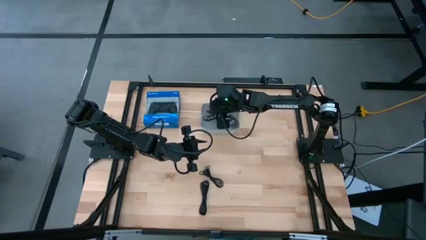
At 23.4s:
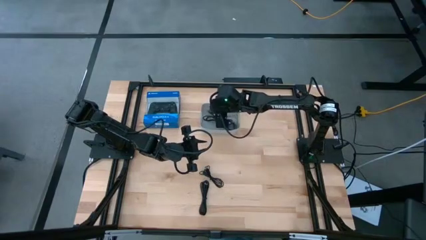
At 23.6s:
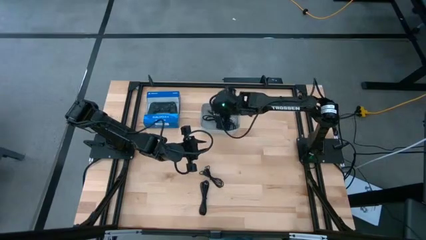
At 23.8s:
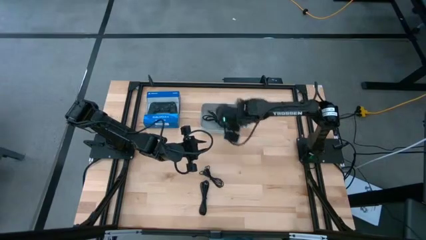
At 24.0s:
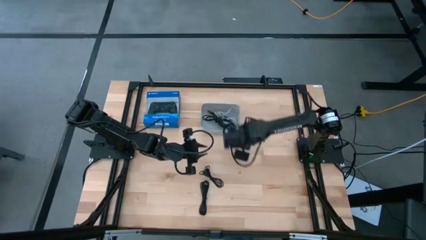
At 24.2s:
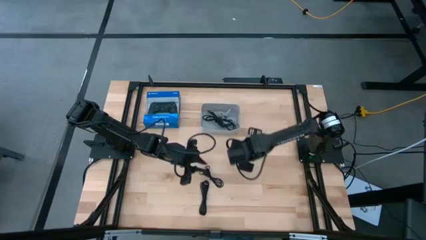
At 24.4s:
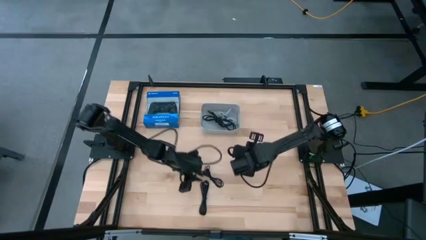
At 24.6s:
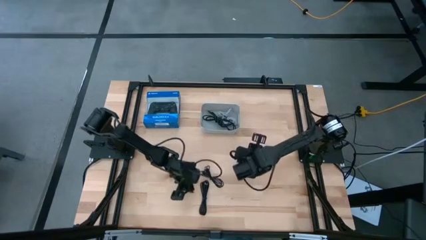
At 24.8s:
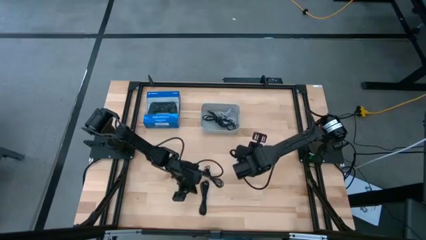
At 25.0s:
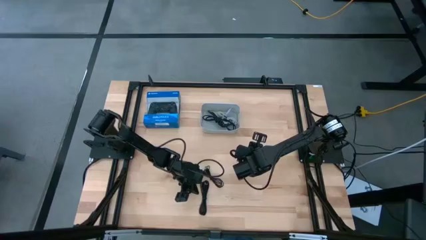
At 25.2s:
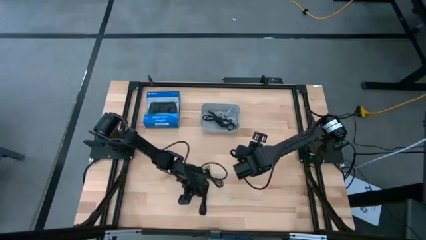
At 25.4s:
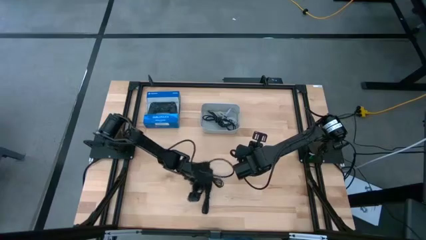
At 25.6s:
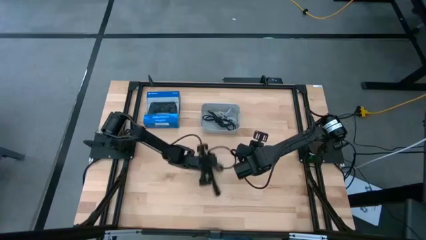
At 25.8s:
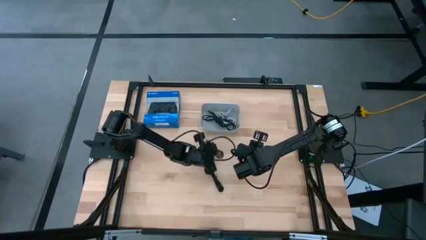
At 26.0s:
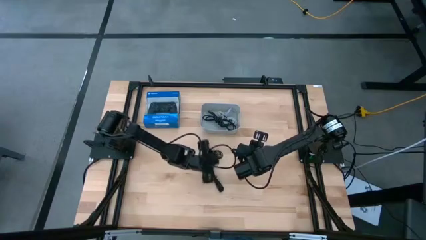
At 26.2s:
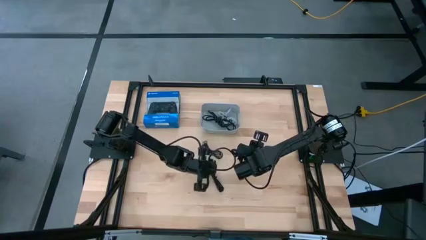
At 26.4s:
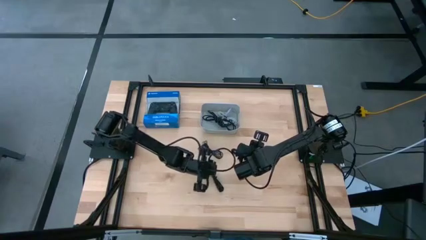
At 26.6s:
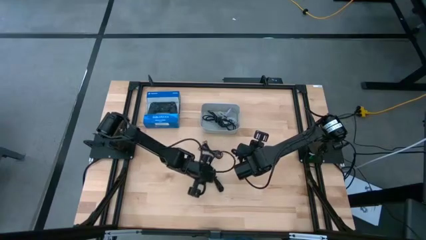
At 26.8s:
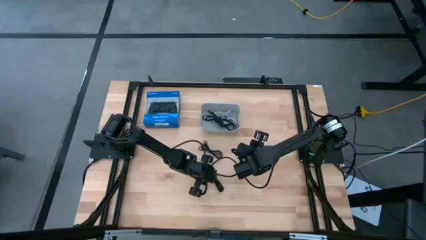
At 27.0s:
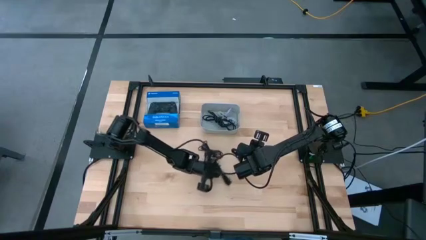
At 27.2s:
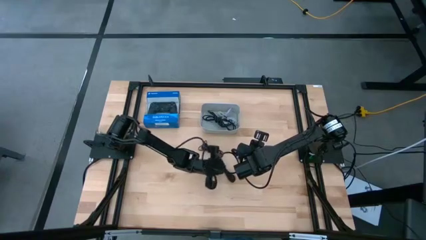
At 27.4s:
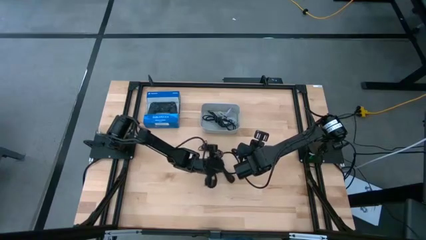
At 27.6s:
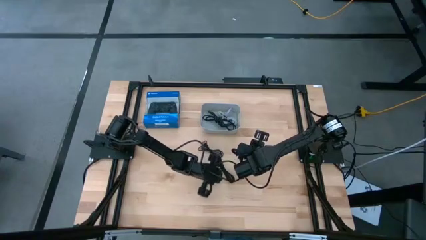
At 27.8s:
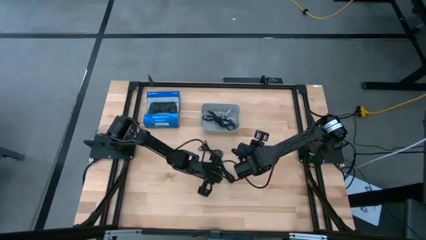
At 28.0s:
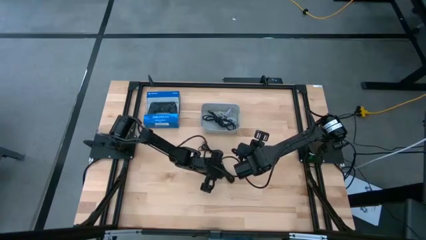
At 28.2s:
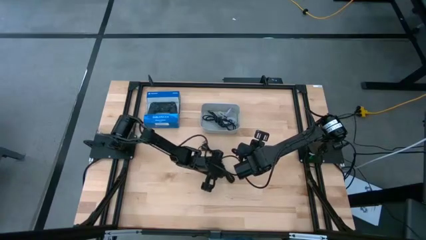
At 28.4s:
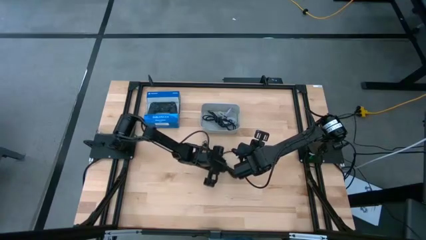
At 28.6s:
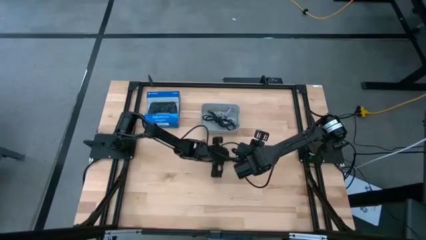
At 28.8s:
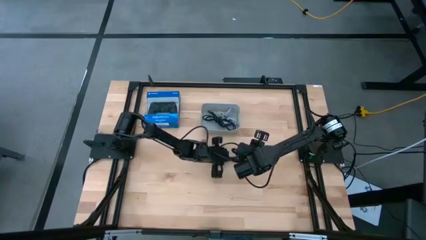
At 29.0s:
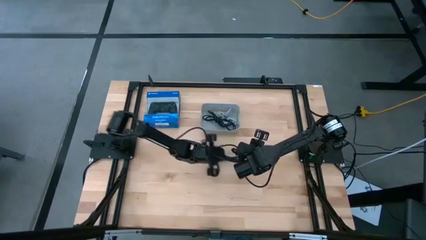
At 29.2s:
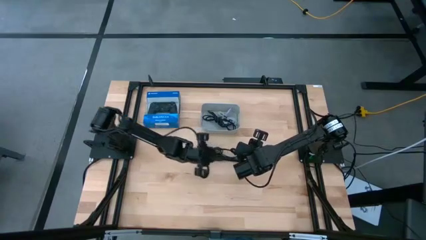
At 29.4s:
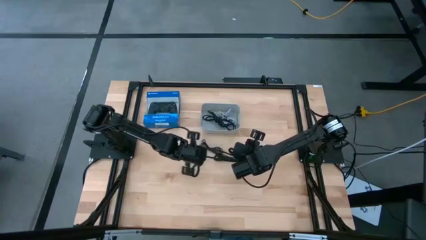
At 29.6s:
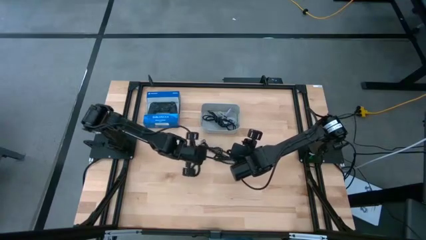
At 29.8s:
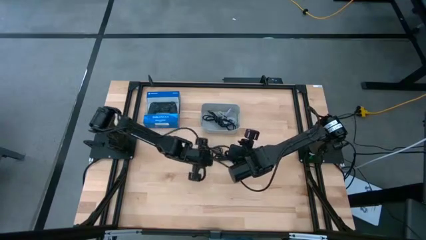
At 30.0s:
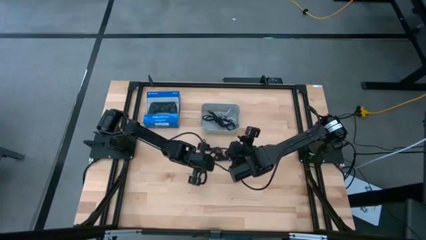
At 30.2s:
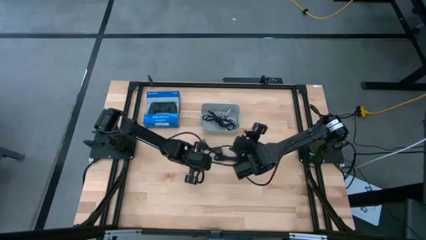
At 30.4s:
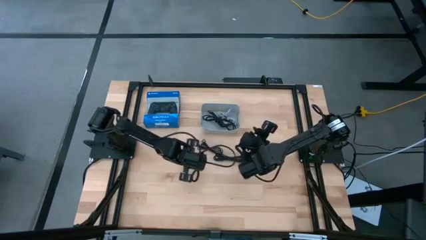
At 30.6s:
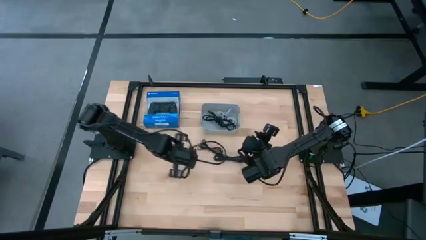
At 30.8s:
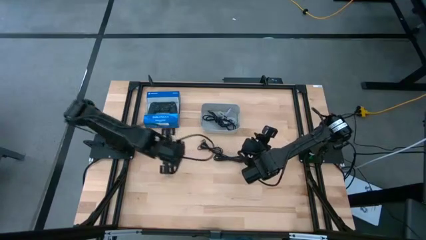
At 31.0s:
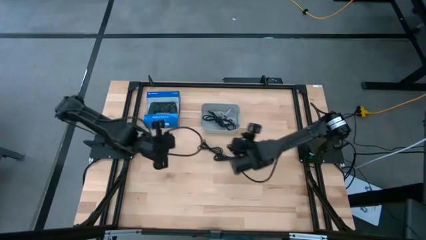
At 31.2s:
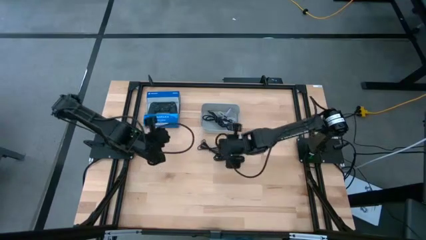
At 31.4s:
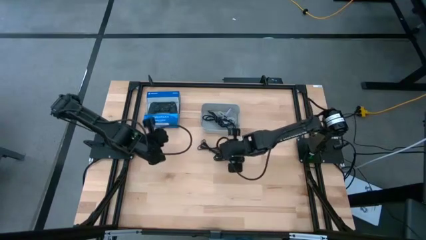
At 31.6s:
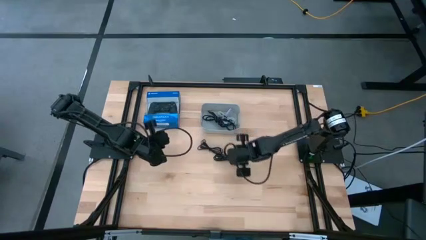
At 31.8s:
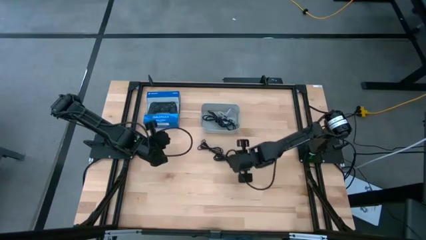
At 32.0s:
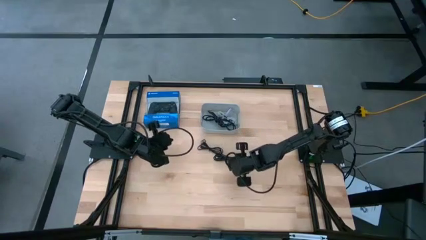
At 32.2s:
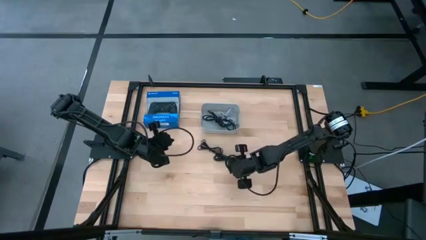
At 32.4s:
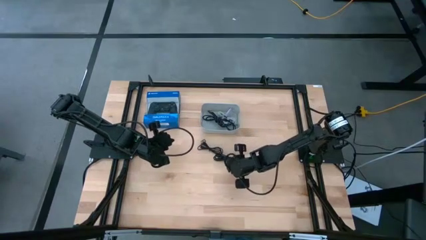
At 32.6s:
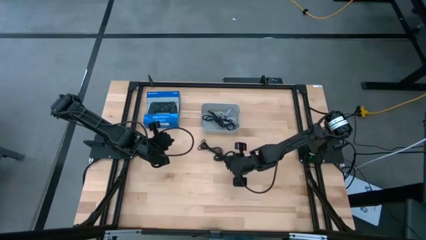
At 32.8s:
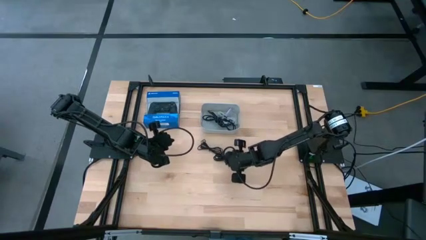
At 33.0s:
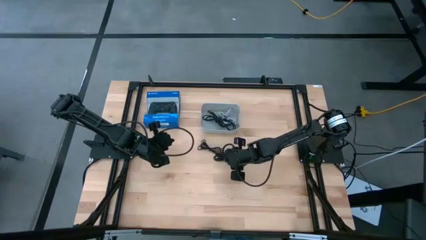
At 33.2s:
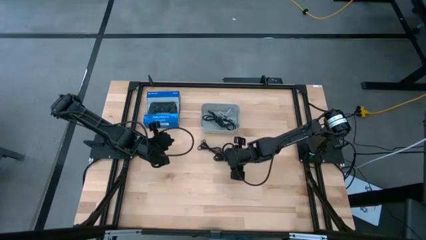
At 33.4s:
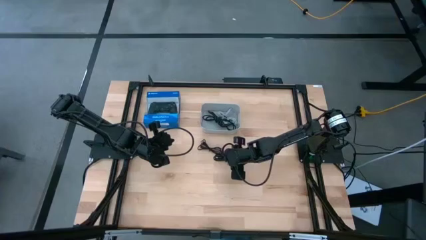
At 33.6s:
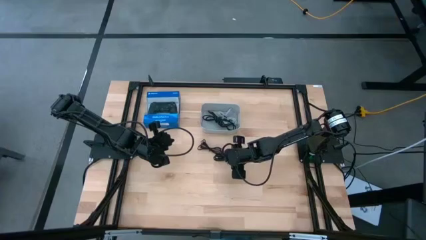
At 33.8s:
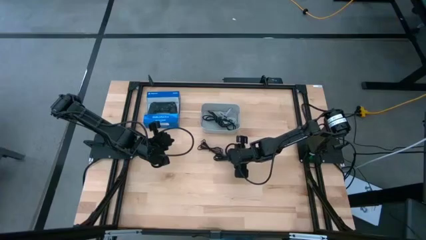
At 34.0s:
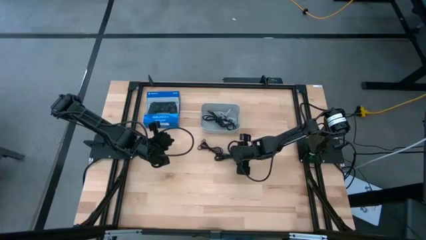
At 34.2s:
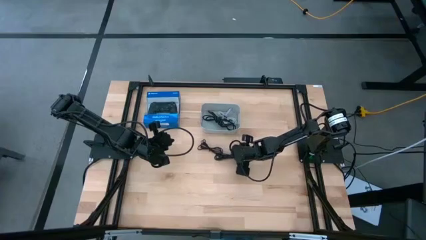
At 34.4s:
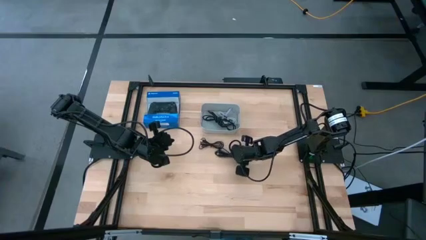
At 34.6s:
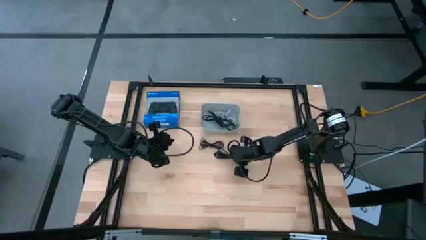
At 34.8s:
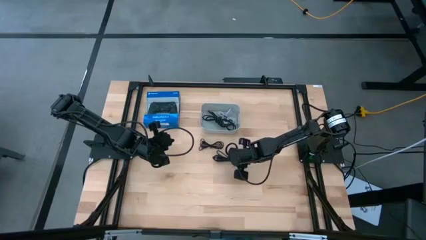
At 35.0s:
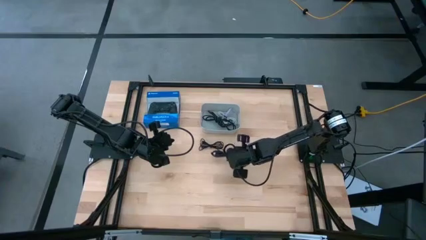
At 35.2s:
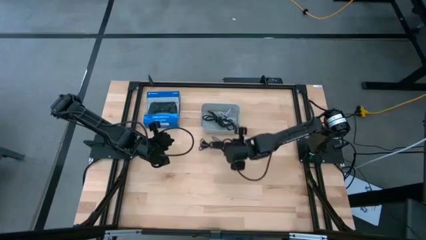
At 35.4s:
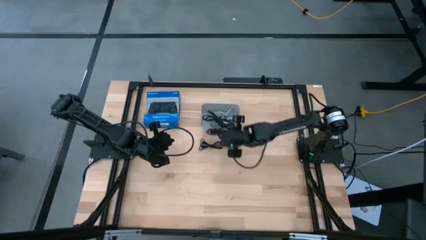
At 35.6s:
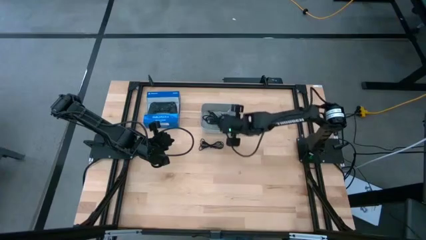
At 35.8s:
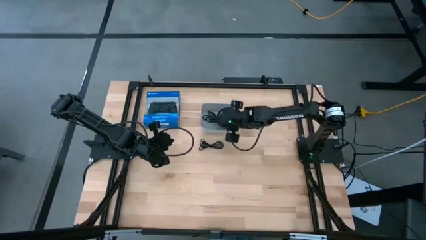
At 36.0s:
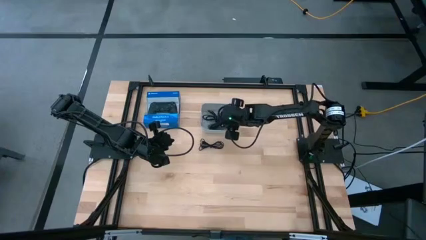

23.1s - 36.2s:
Task: Pick and place USB-C Cables
Put the bottom black charger cable into the white bin

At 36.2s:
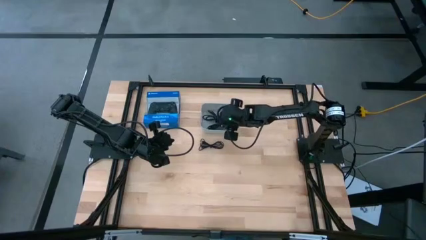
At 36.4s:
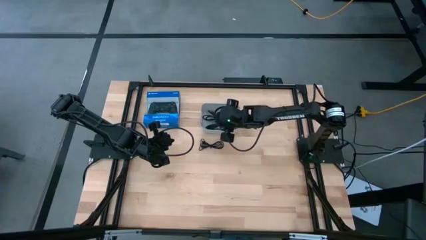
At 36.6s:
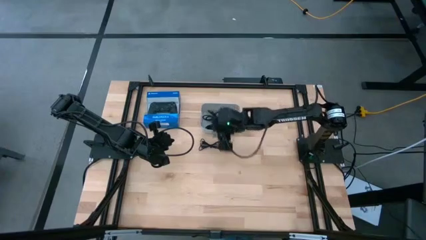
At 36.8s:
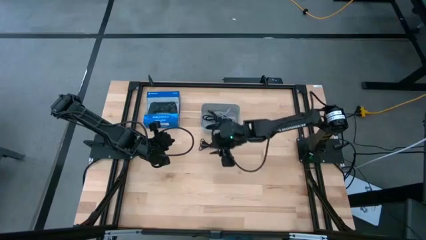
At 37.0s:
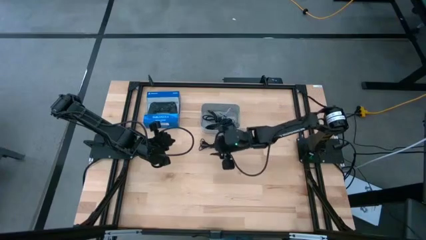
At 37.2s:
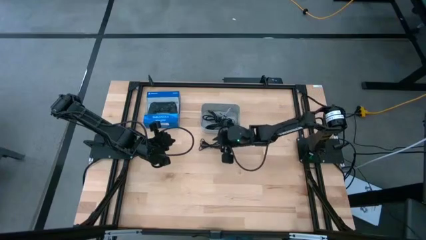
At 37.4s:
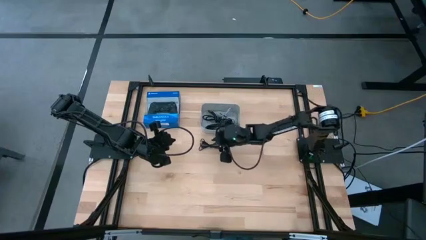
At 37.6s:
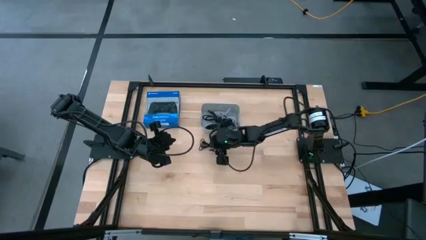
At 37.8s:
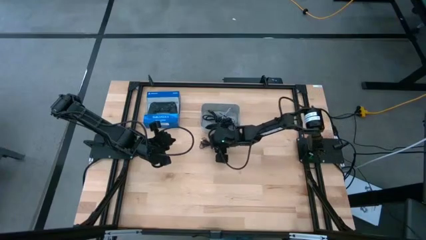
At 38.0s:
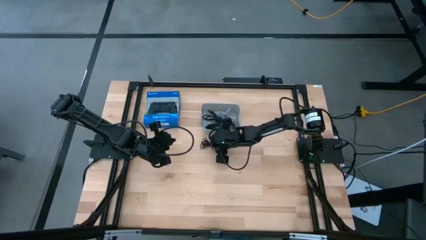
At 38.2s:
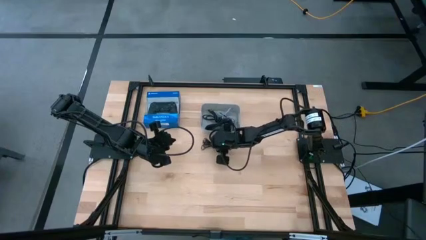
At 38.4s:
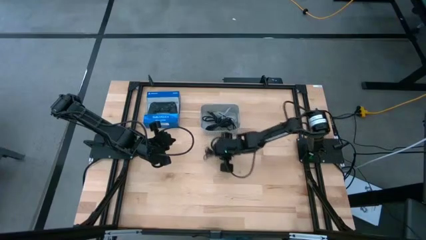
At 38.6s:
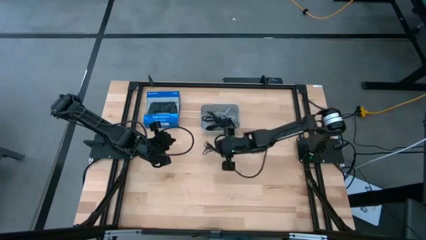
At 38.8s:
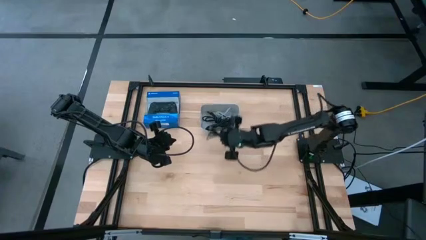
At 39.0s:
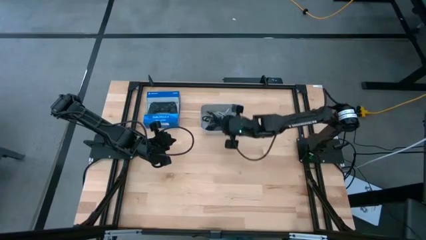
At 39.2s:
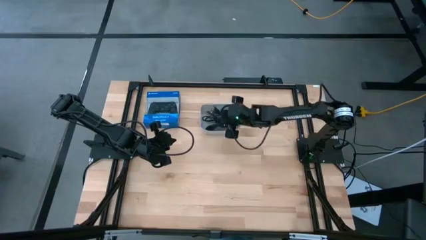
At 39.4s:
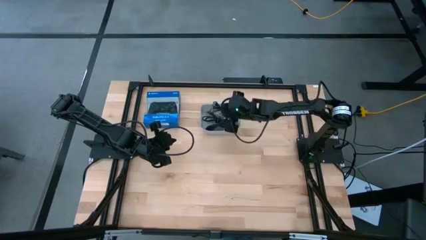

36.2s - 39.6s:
Put the black charger cable into the white bin
